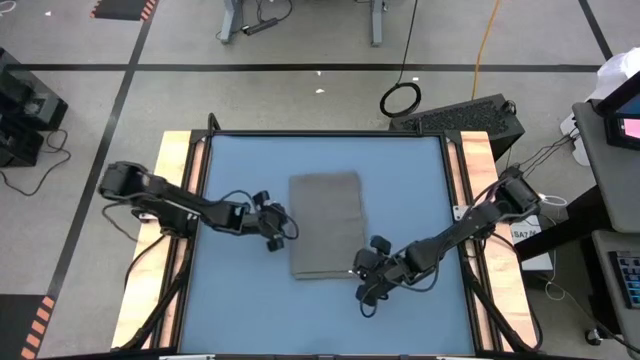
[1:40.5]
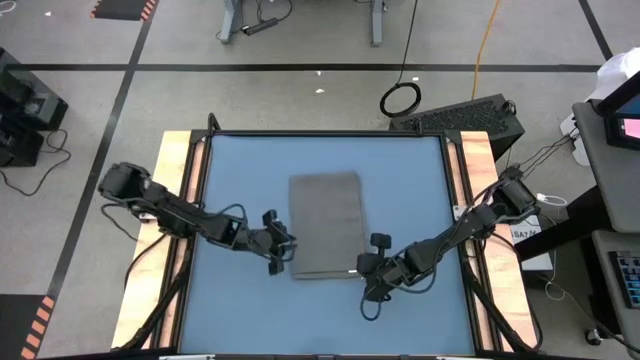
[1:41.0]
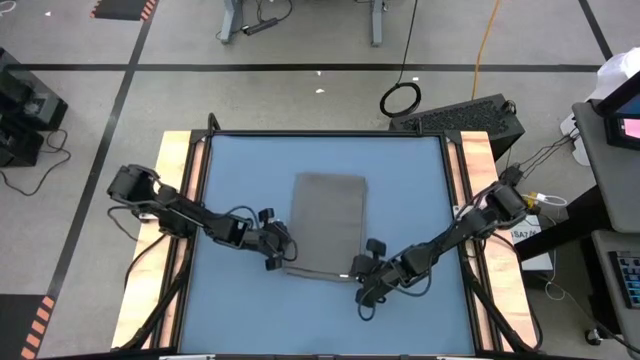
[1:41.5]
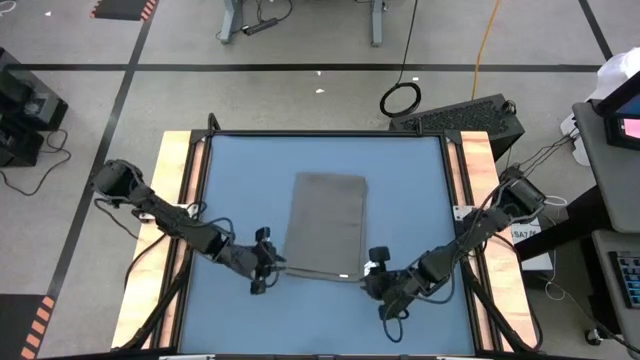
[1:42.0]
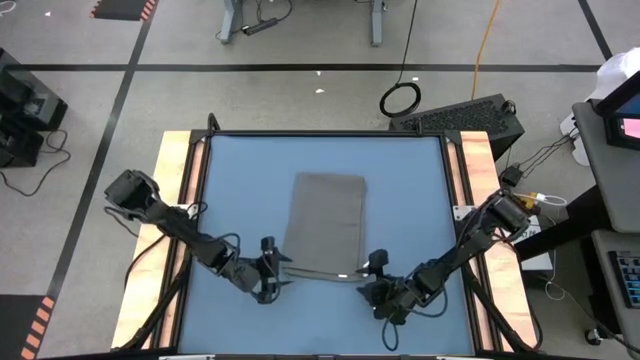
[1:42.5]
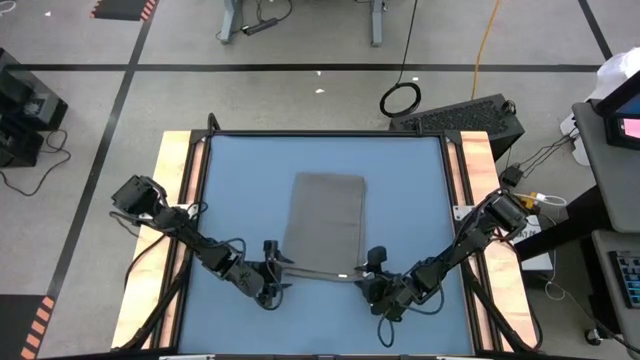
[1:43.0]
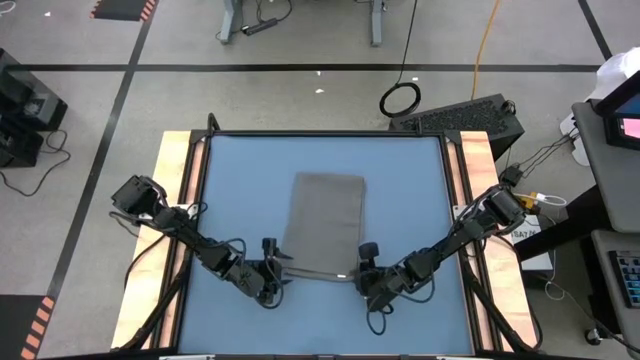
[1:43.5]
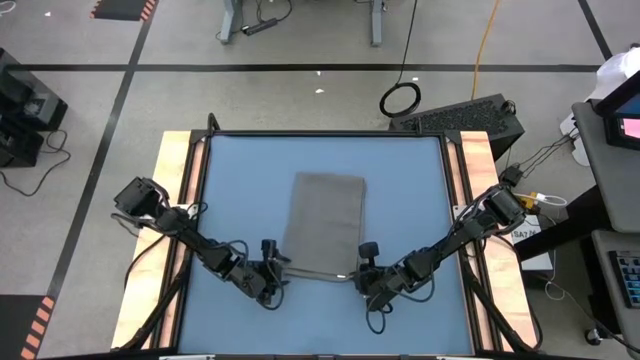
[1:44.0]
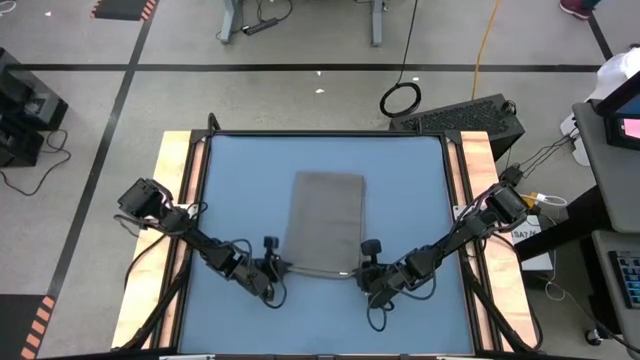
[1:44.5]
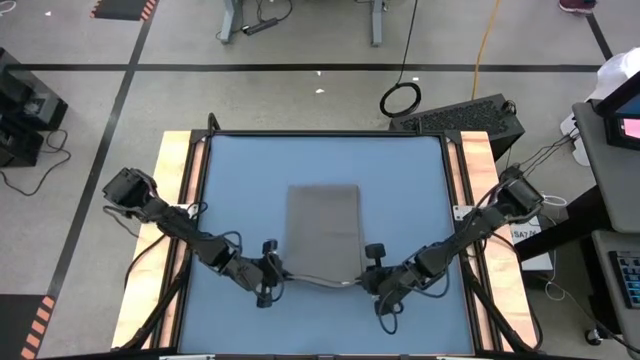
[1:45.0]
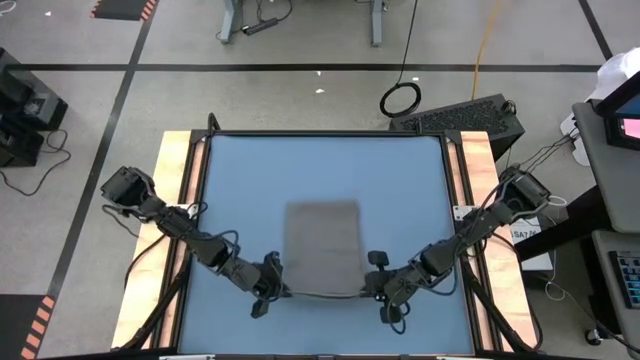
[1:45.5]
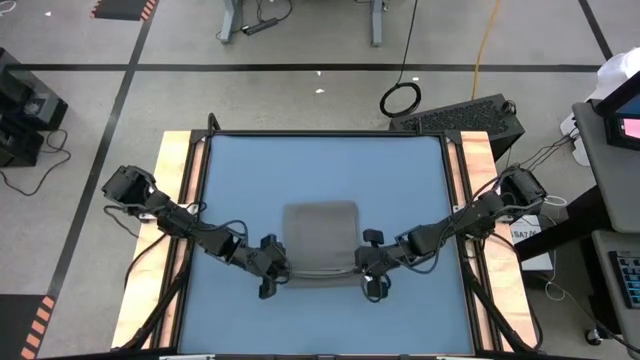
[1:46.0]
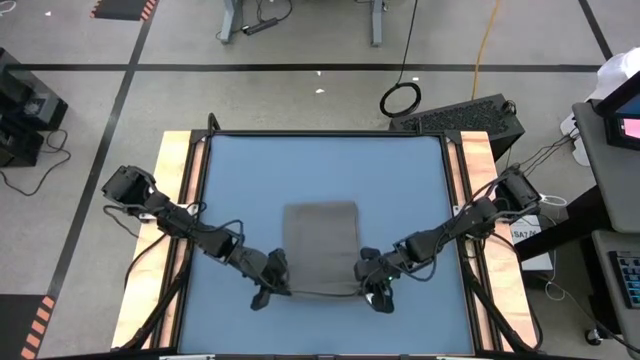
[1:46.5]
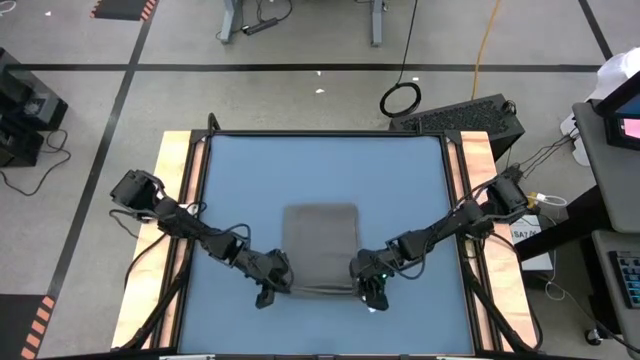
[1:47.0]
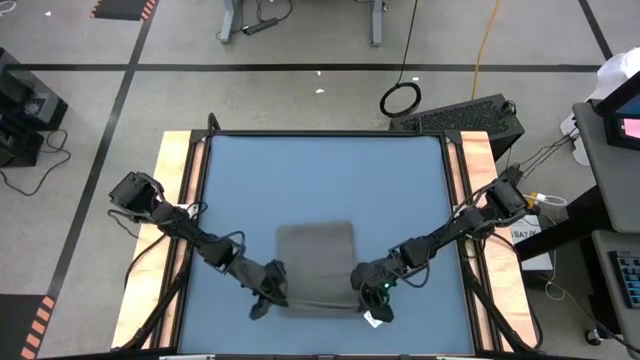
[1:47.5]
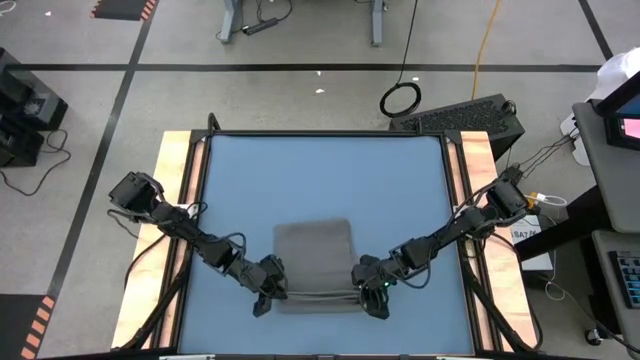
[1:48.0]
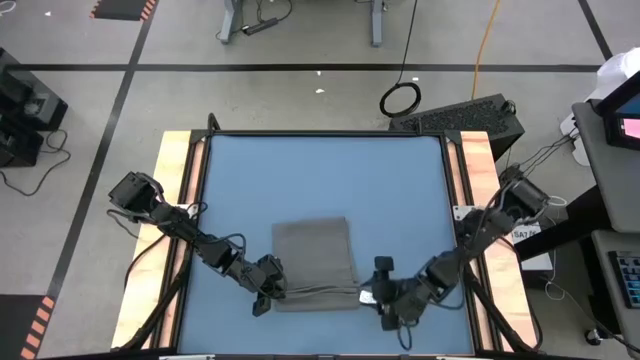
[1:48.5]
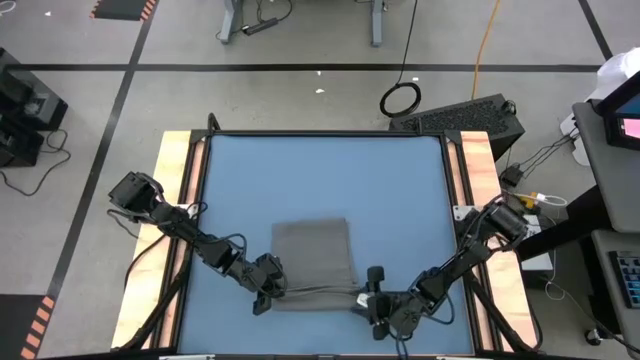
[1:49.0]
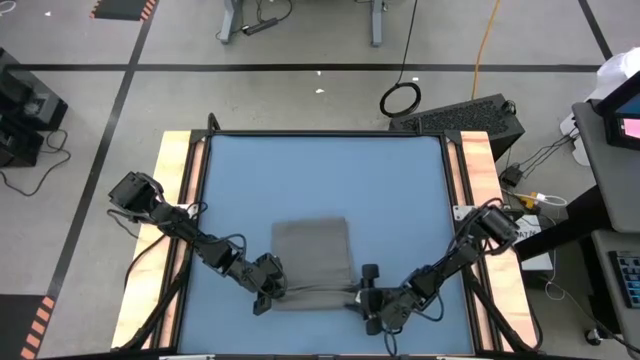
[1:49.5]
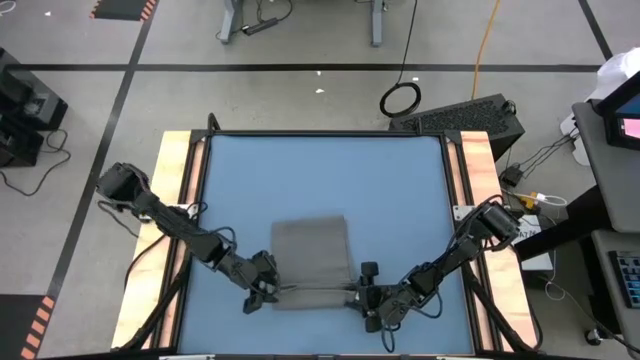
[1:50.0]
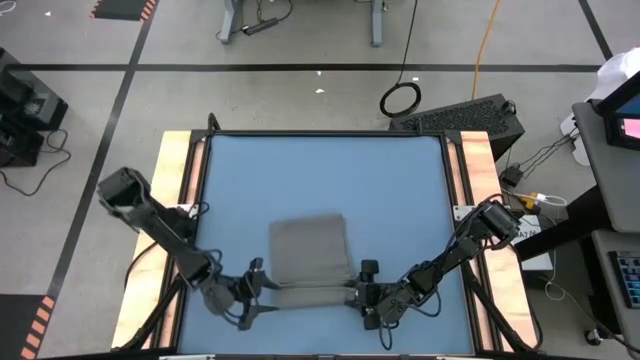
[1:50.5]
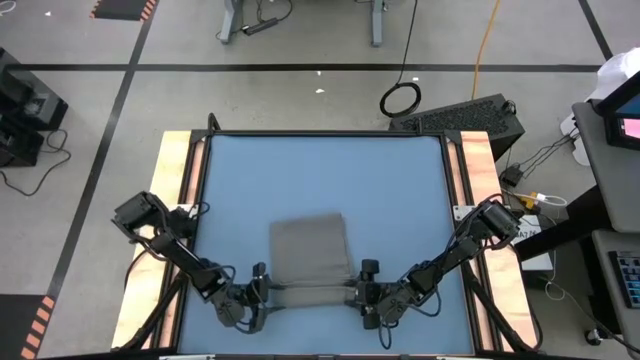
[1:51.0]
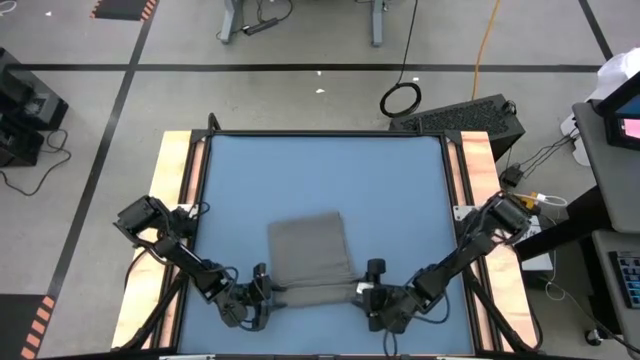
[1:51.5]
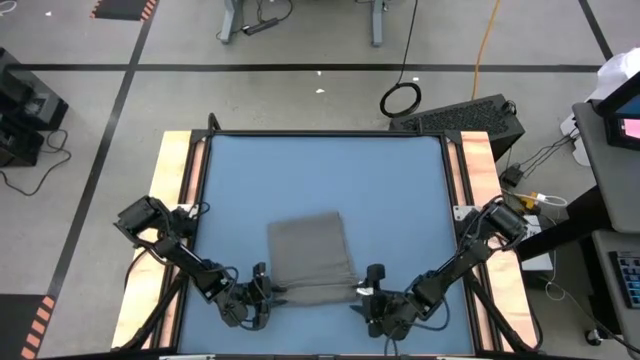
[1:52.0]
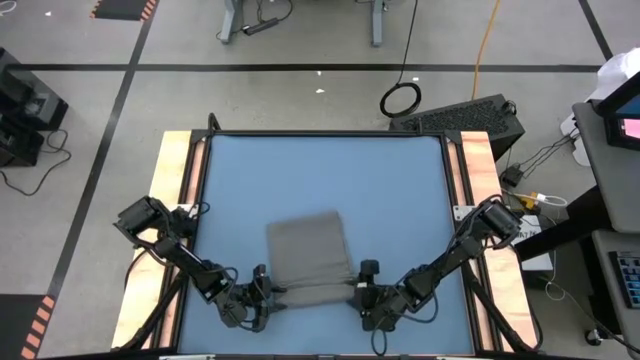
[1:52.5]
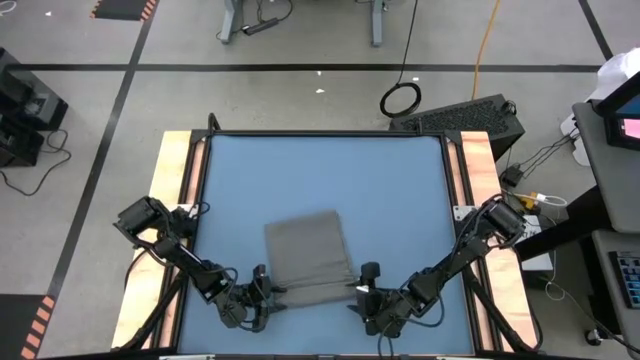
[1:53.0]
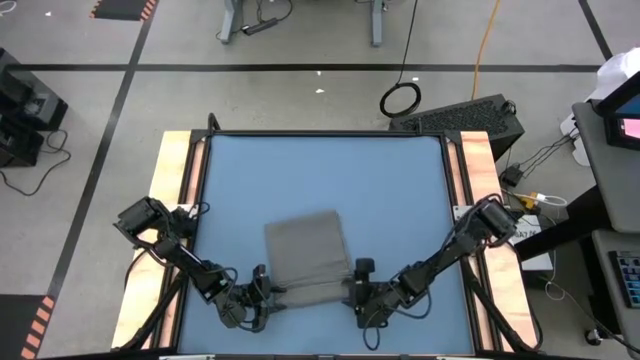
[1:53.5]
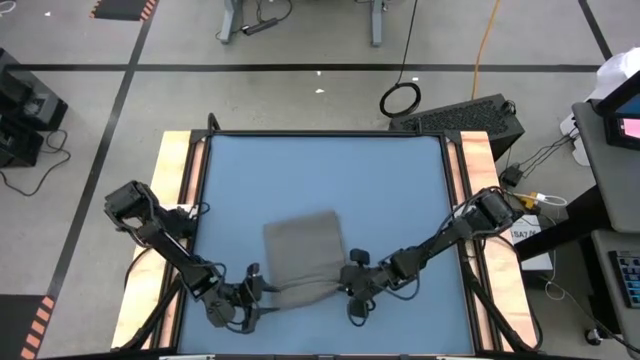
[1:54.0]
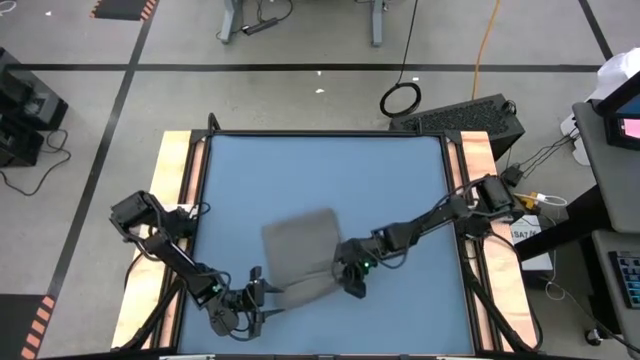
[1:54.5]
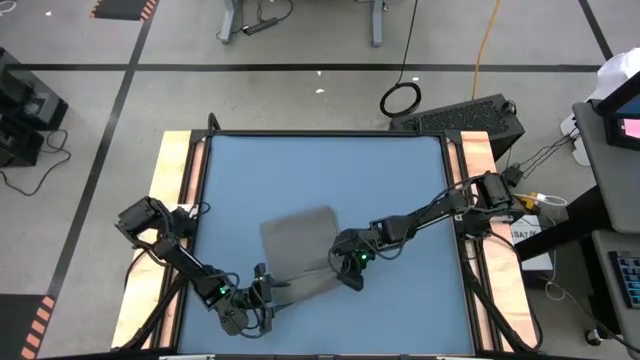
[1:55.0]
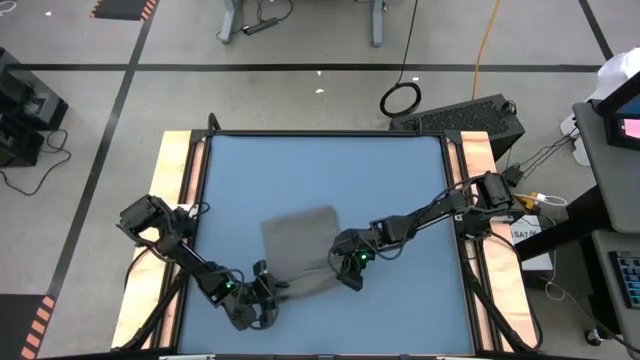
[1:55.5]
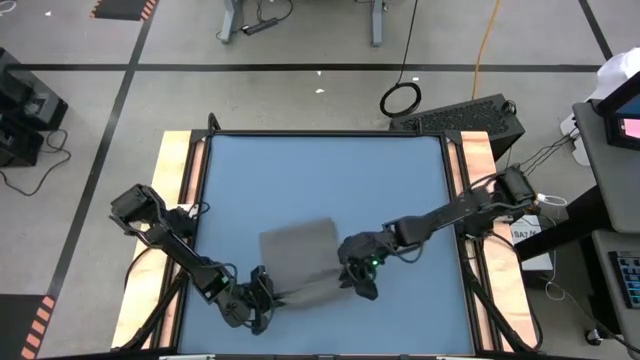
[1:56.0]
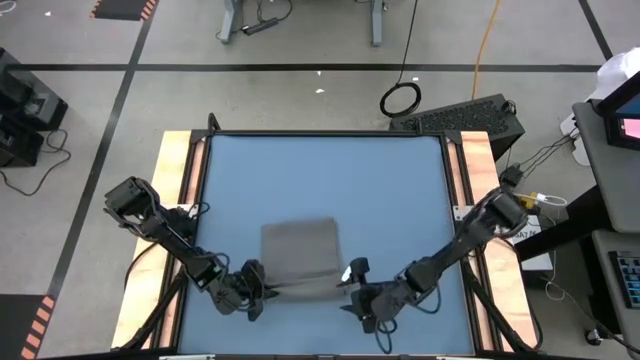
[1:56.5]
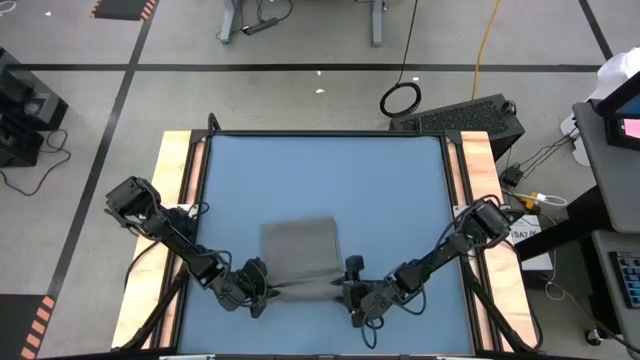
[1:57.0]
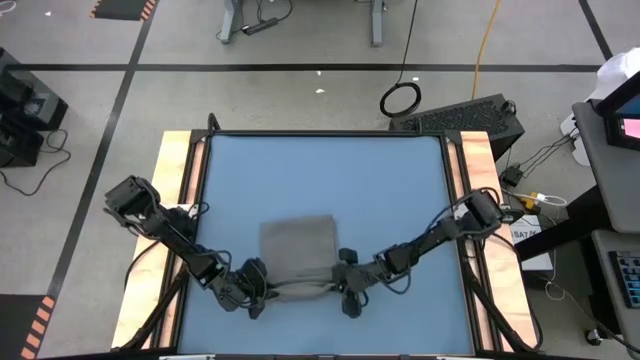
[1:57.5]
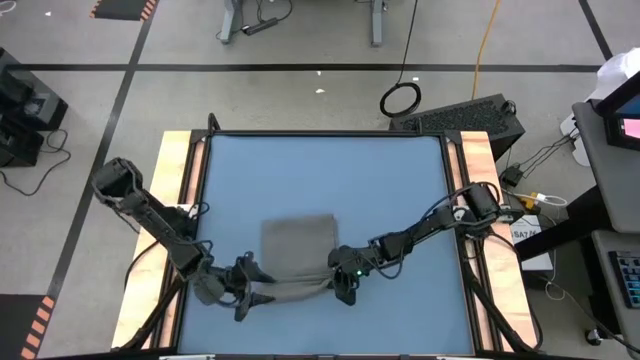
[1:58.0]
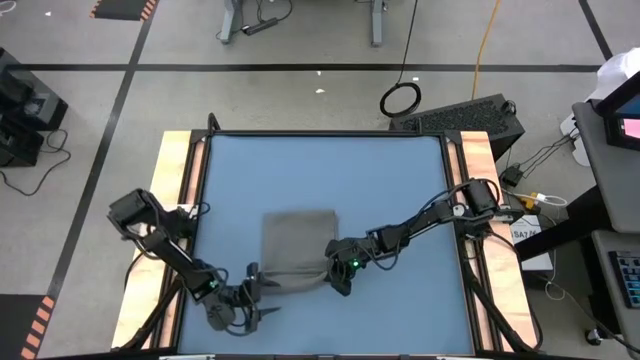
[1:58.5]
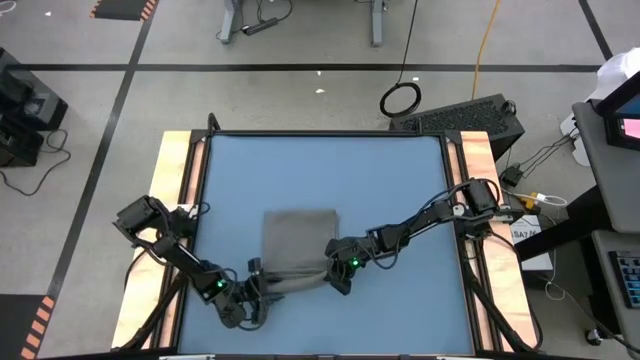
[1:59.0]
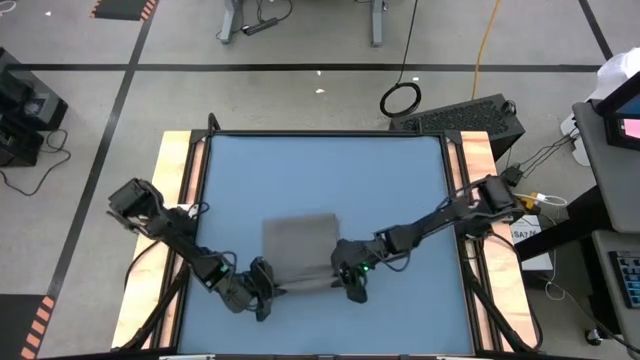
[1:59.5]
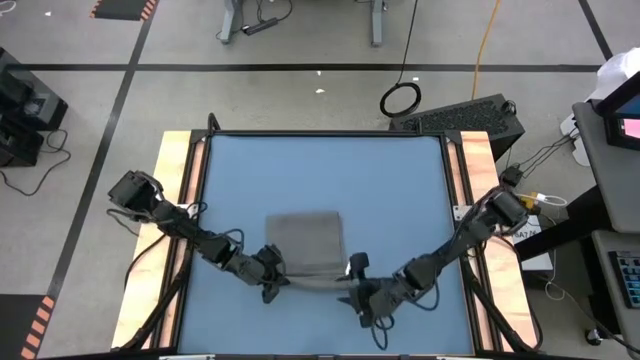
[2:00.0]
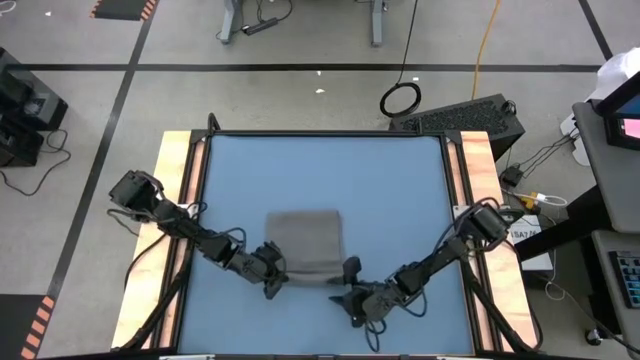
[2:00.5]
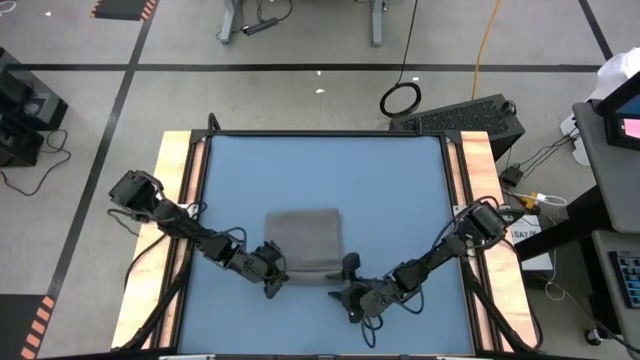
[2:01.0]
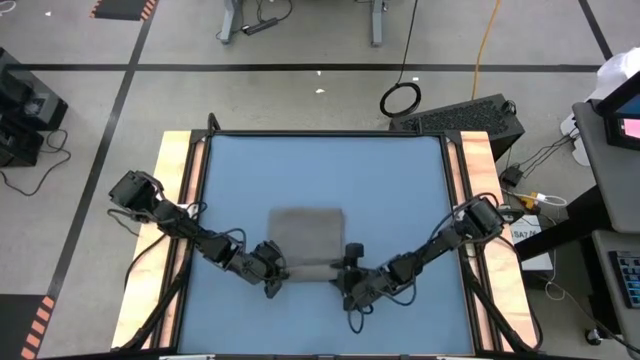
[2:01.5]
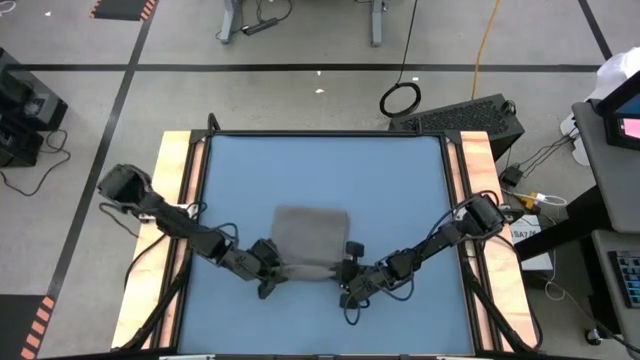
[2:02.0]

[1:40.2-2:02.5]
Task: Roll towel
Roll the gray towel
